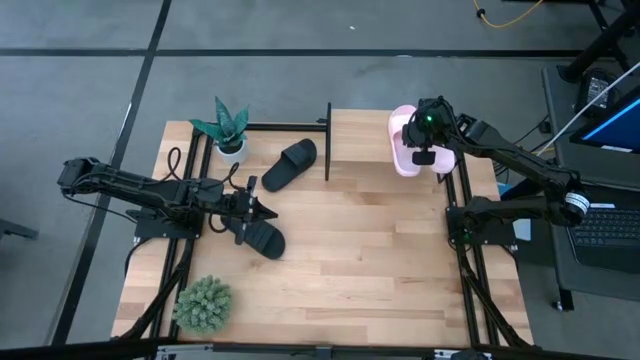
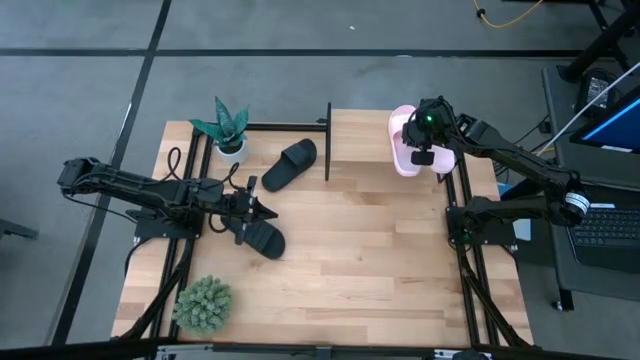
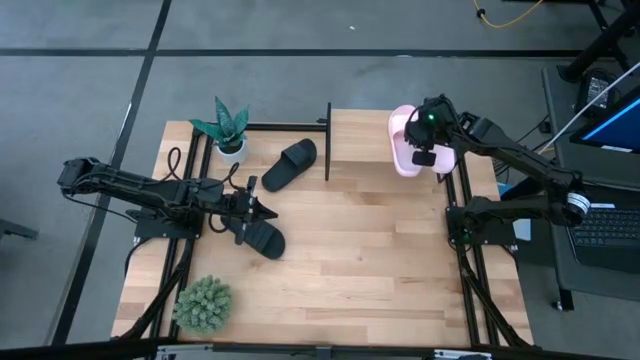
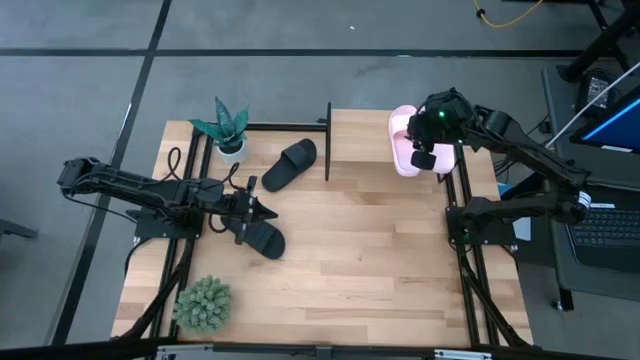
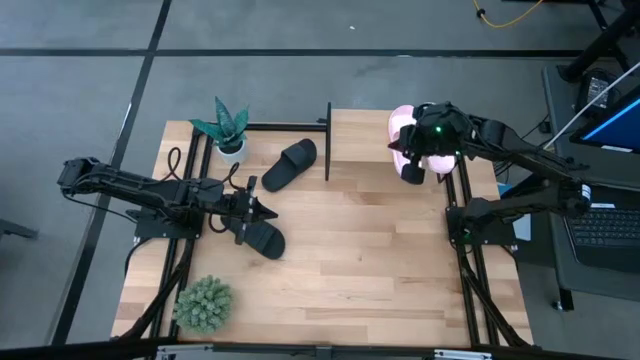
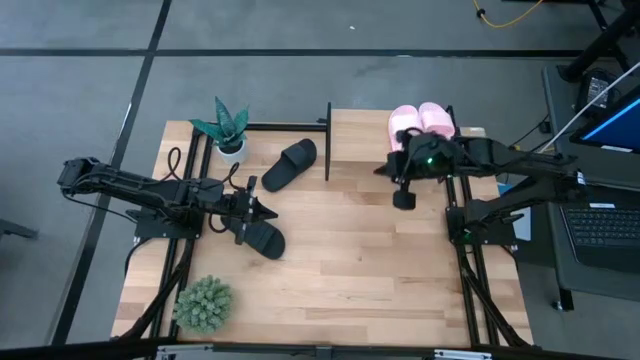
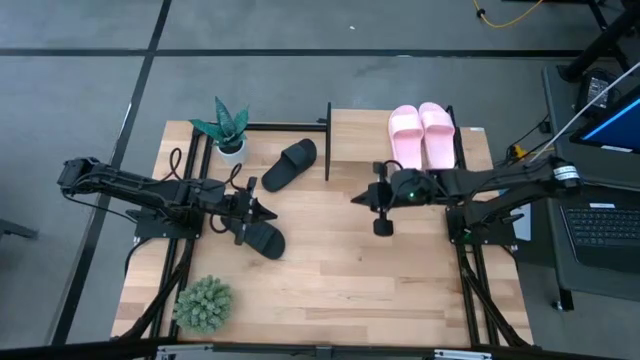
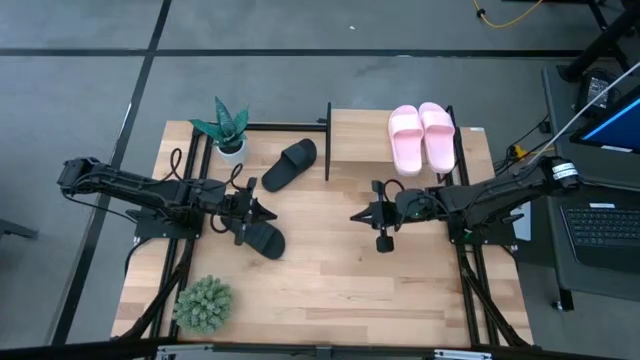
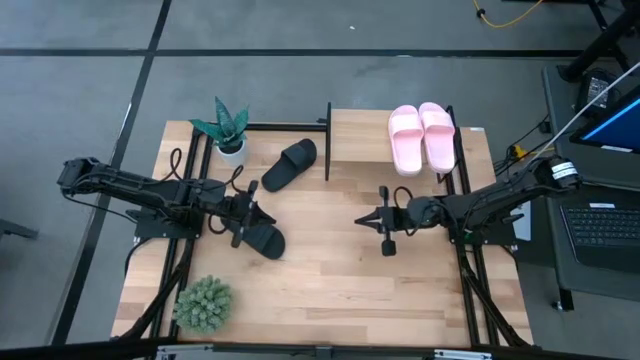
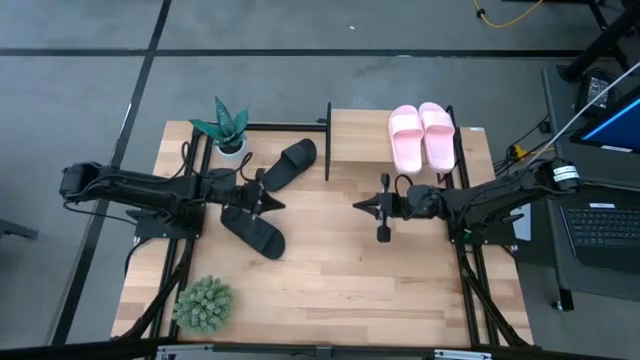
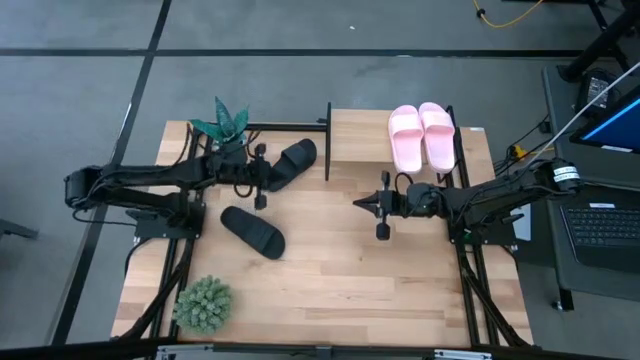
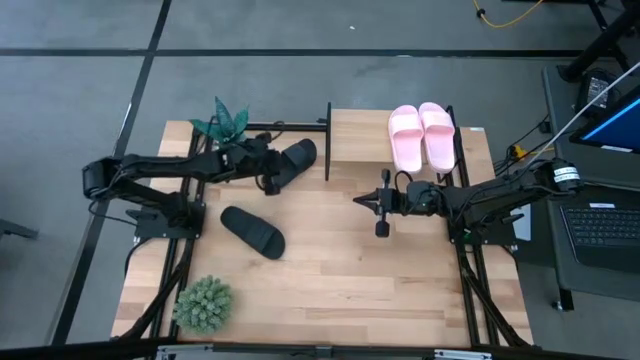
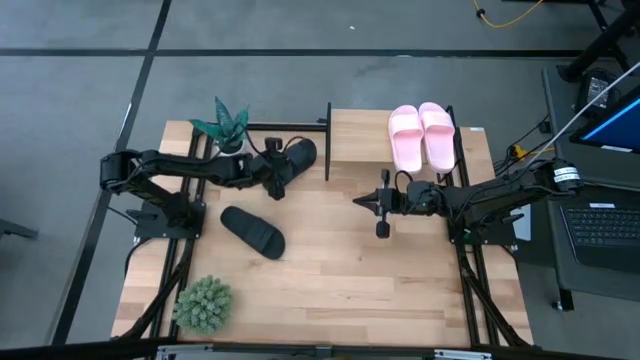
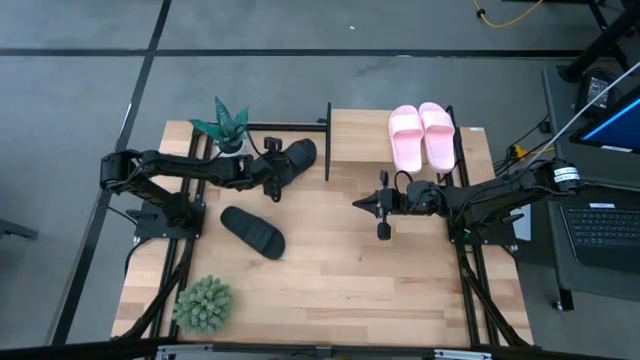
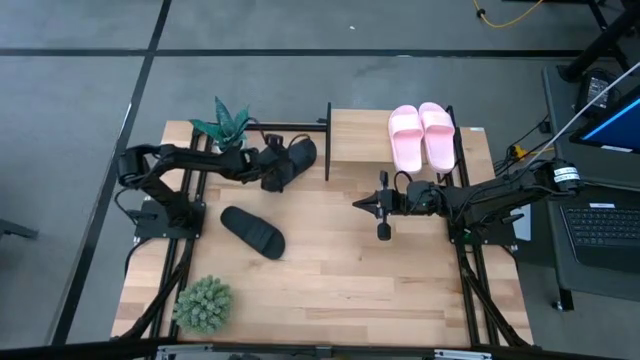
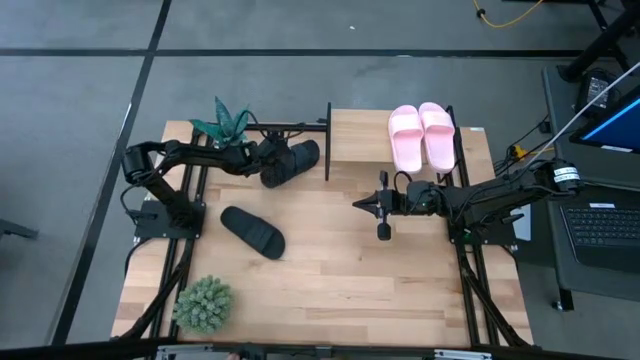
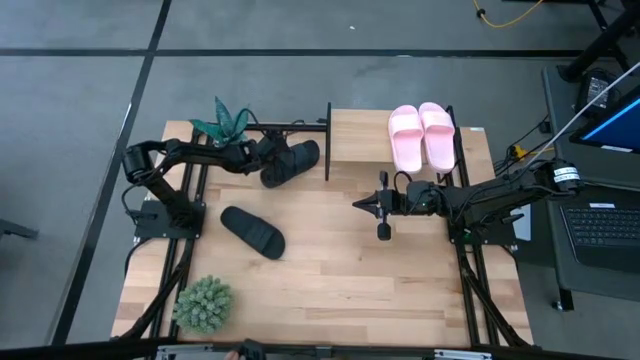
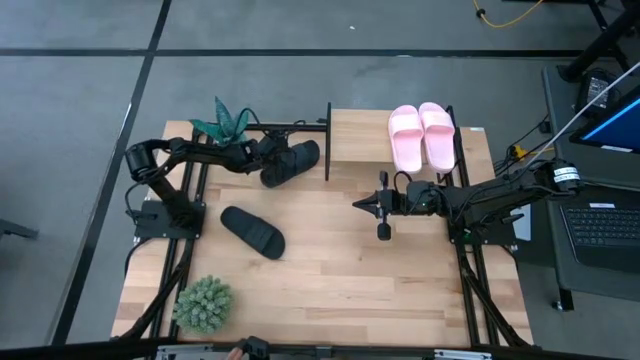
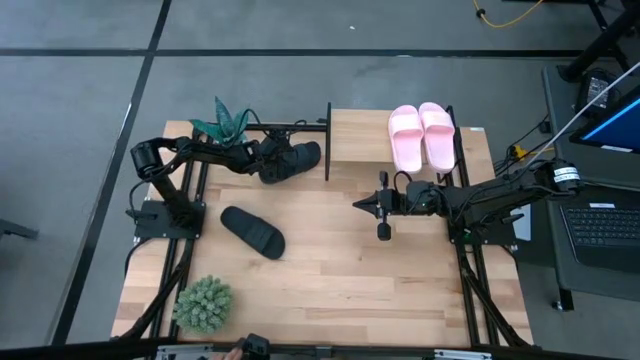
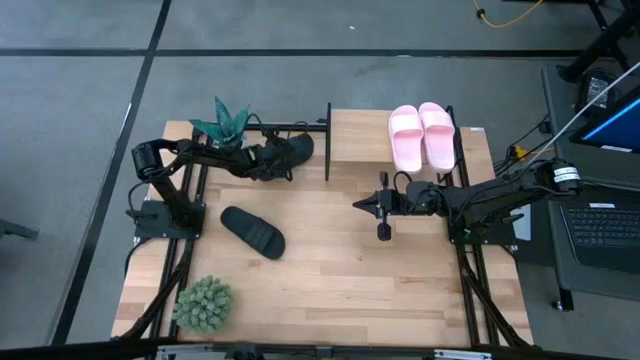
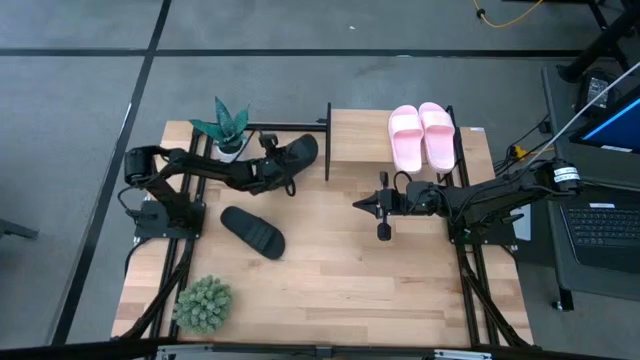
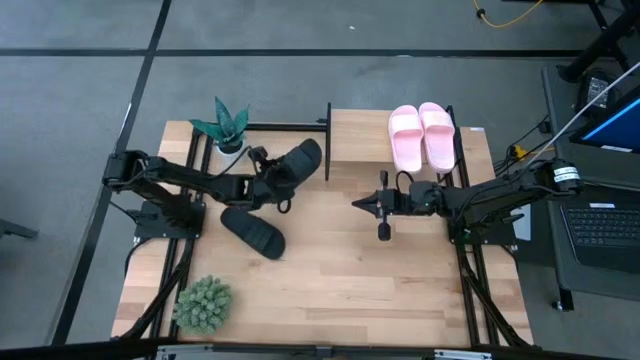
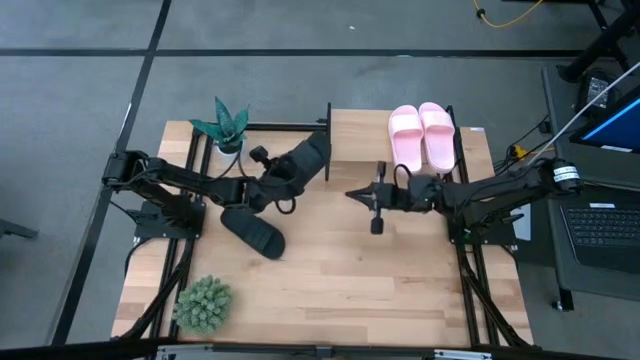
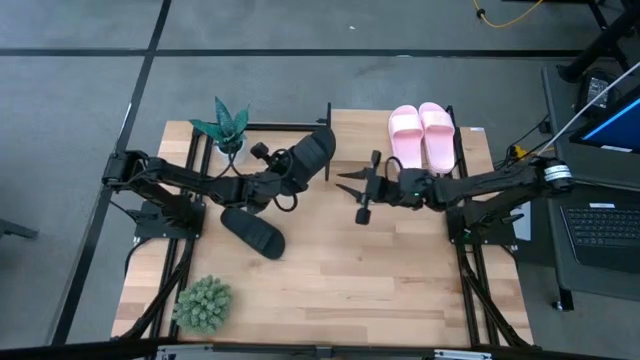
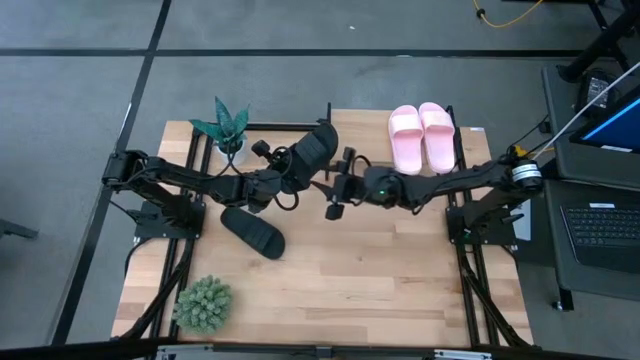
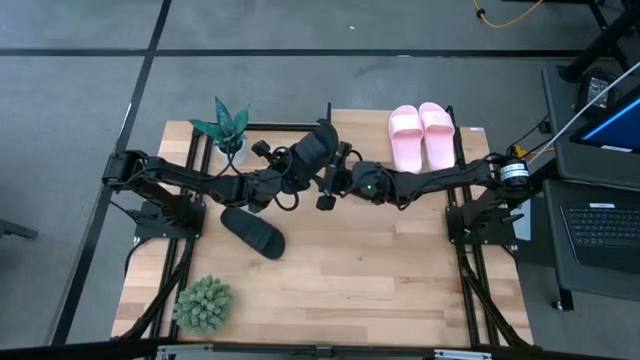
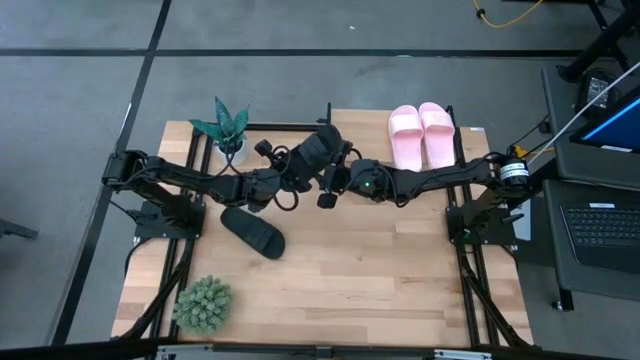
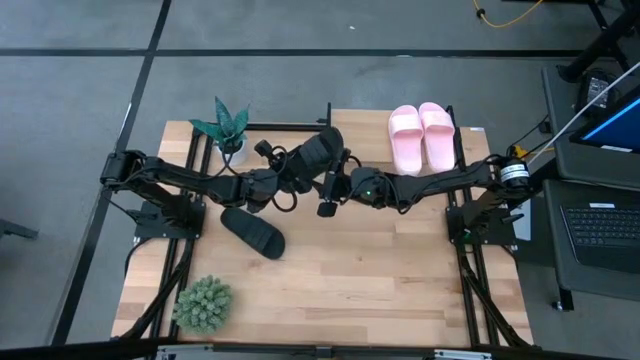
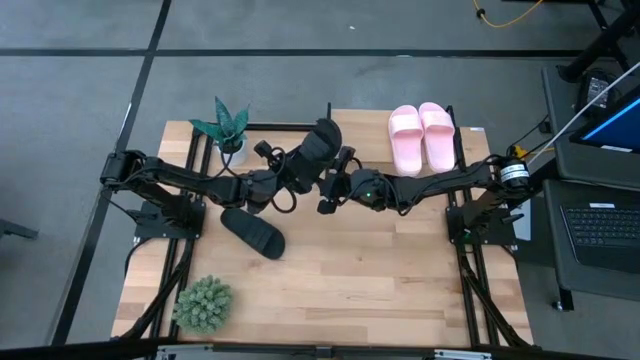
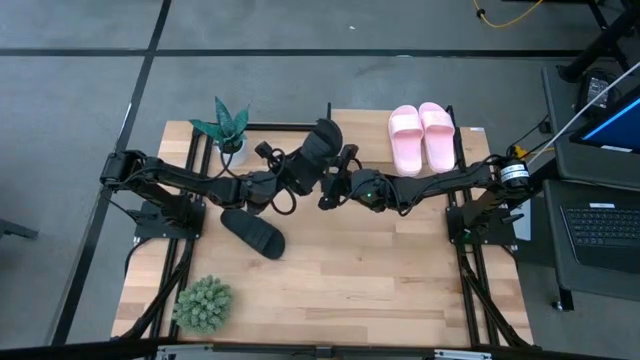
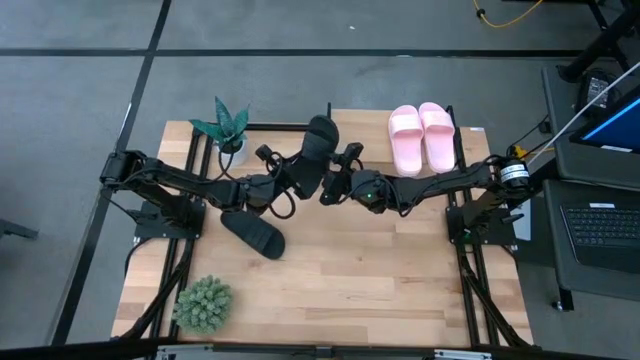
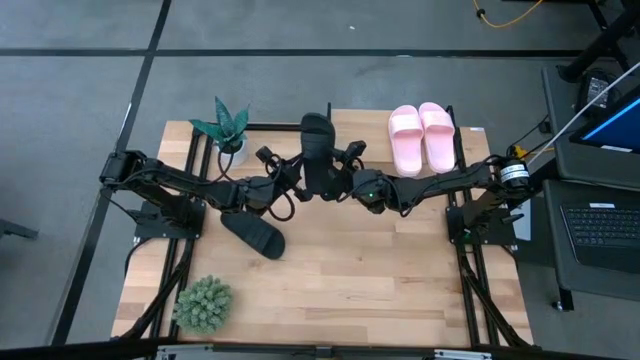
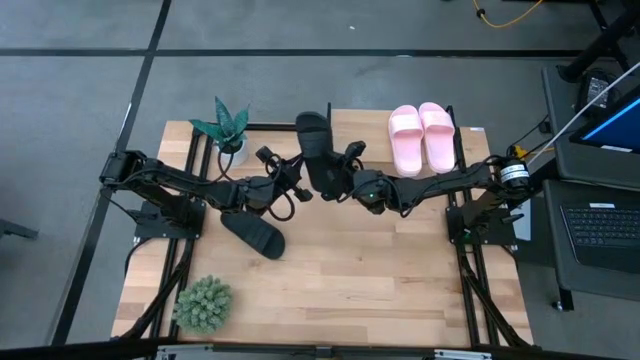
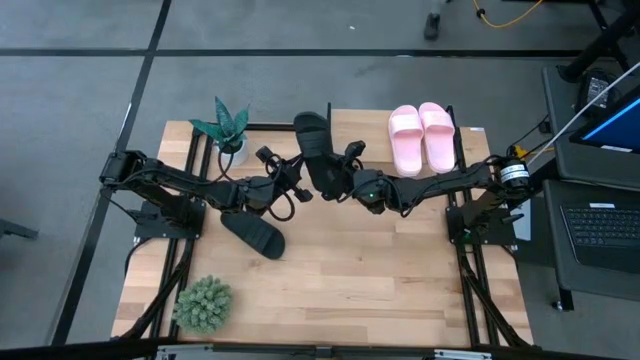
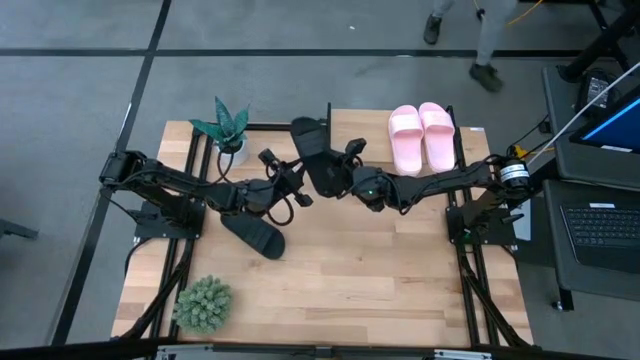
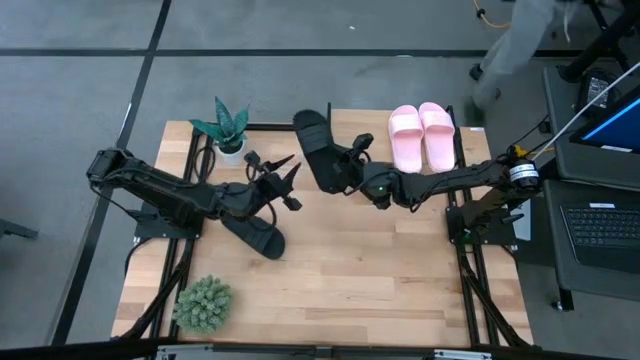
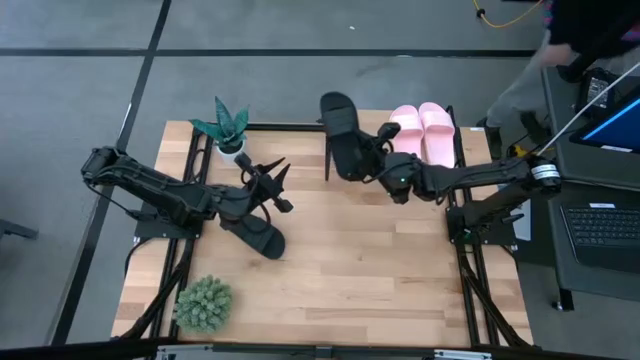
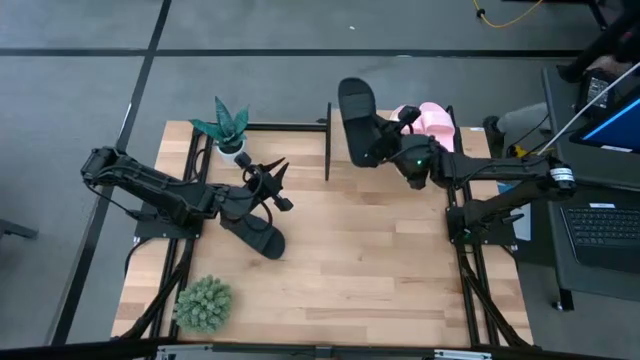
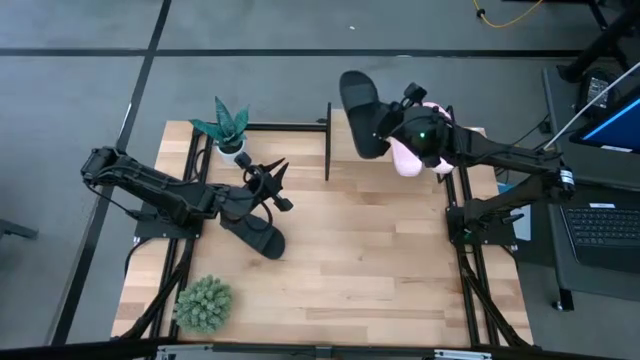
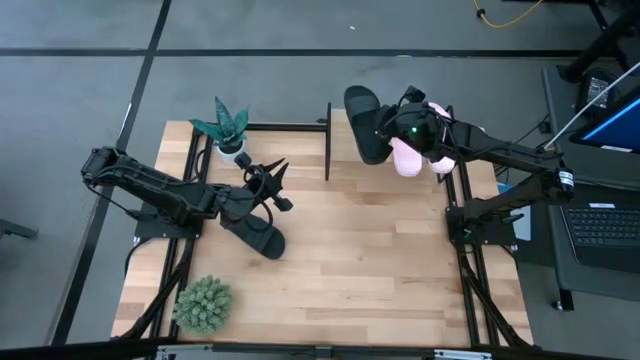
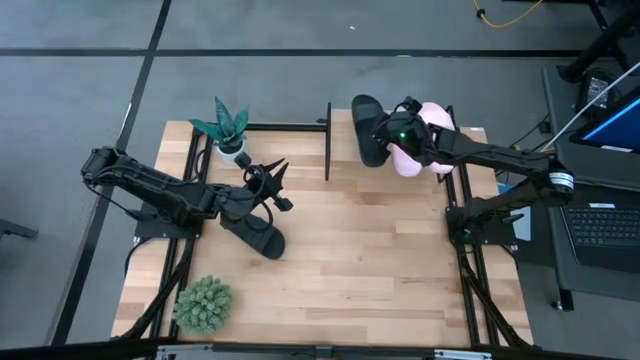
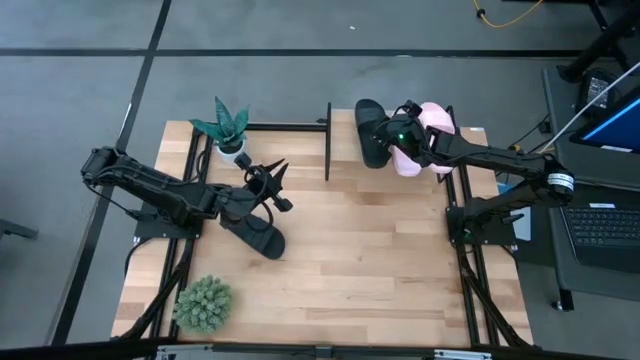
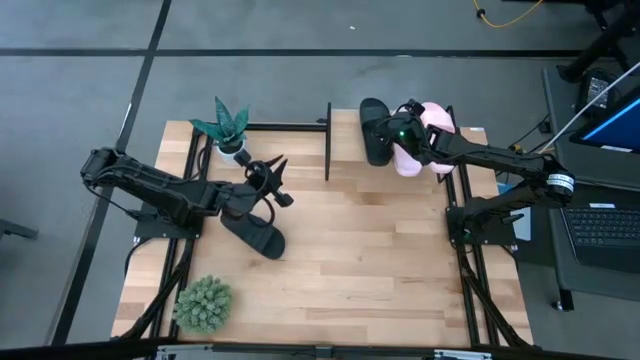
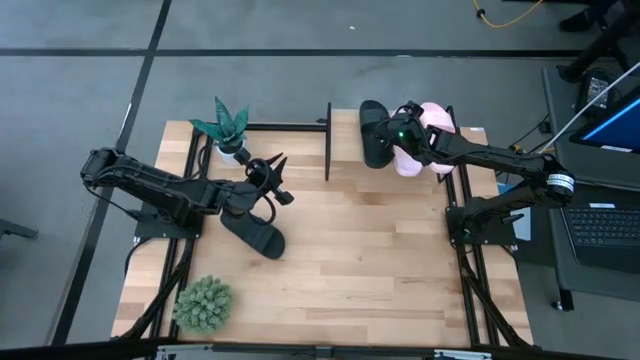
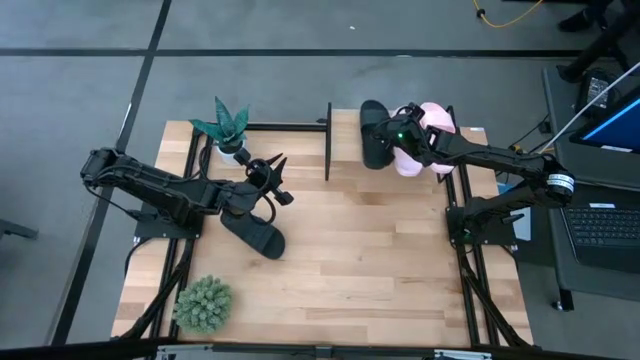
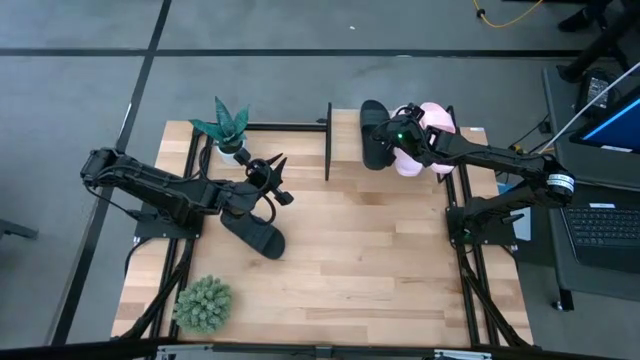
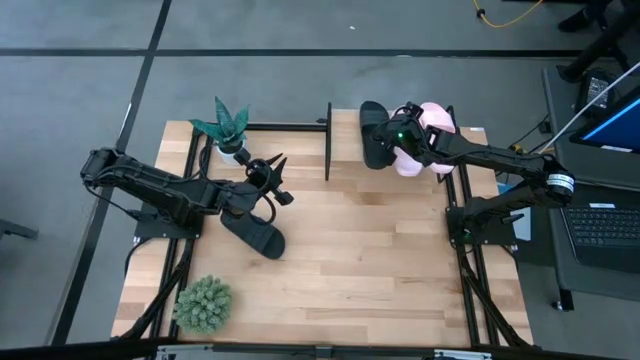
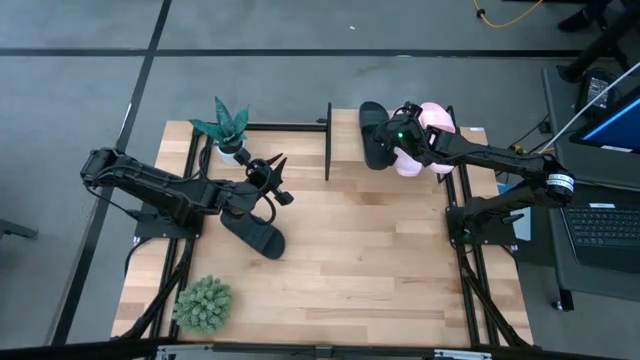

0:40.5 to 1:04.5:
Task: Pick and place slides into the shelf
Put the top black slide on the shelf
